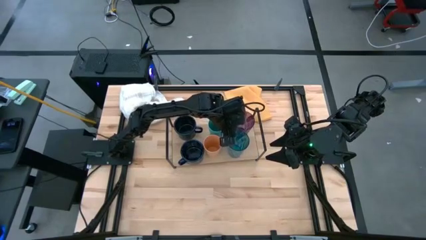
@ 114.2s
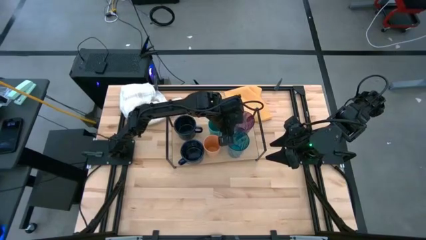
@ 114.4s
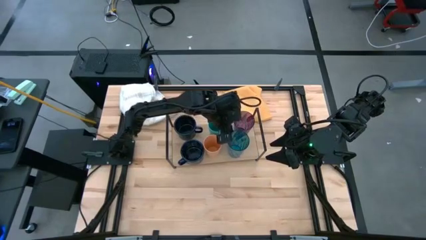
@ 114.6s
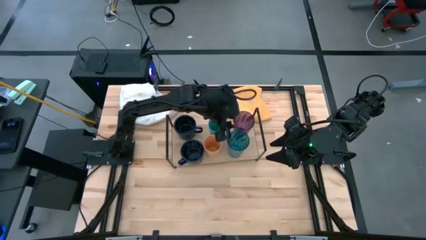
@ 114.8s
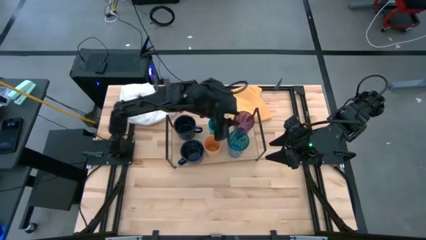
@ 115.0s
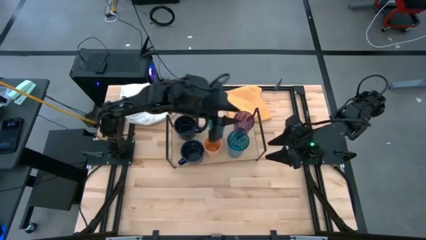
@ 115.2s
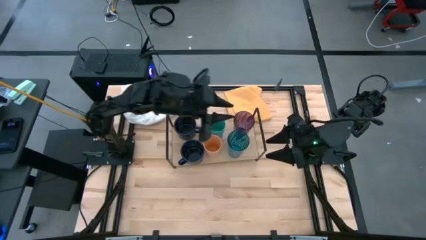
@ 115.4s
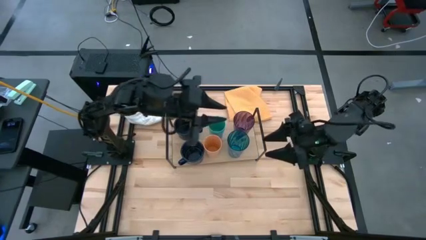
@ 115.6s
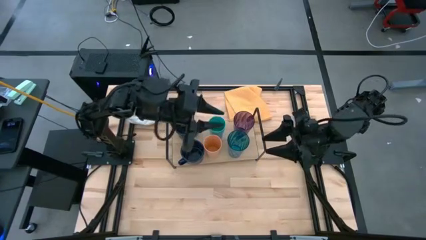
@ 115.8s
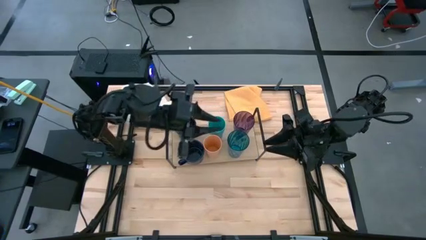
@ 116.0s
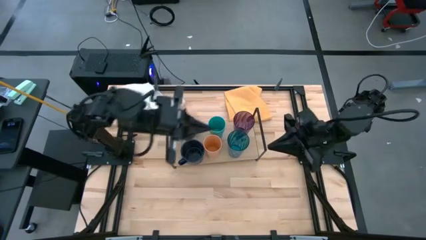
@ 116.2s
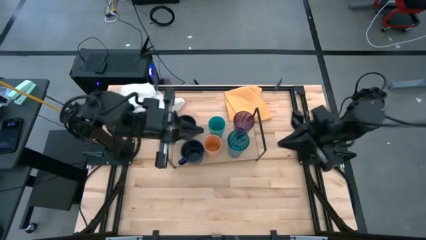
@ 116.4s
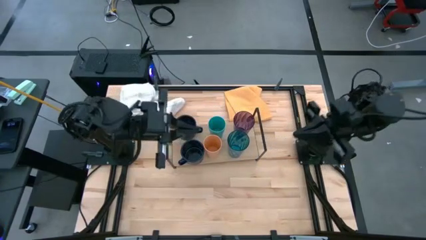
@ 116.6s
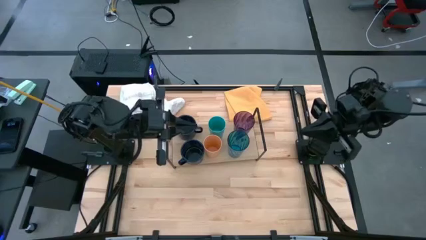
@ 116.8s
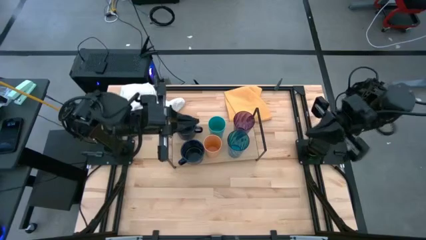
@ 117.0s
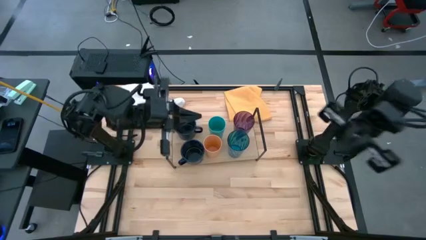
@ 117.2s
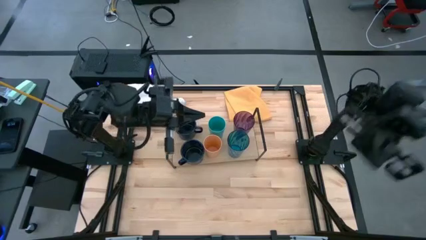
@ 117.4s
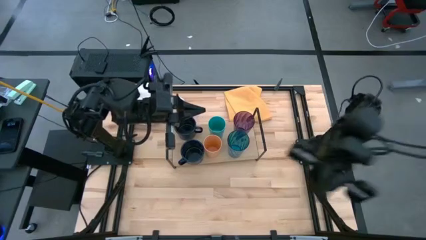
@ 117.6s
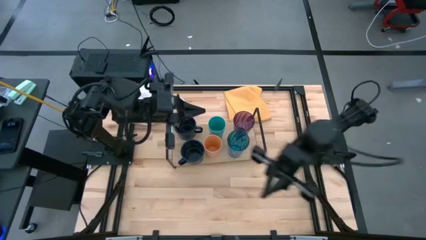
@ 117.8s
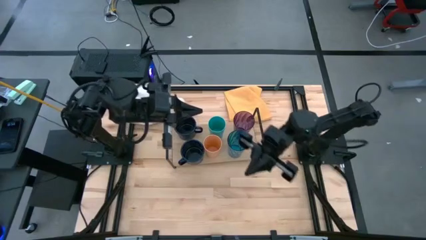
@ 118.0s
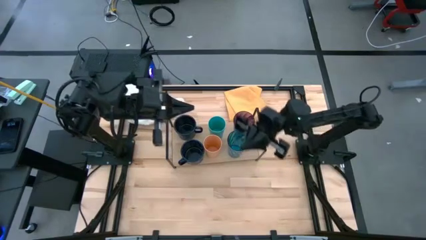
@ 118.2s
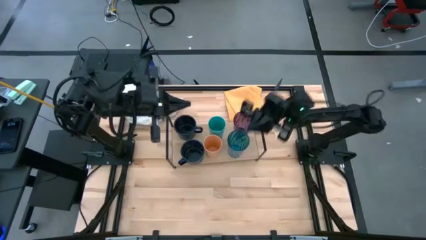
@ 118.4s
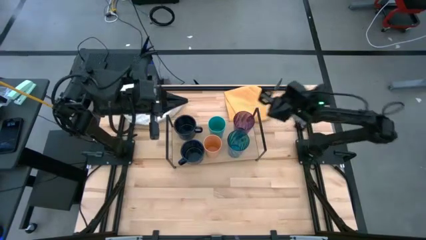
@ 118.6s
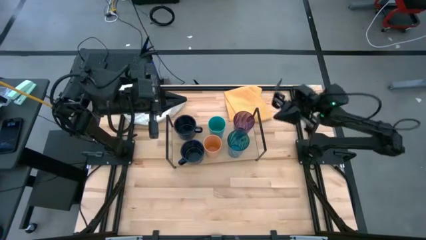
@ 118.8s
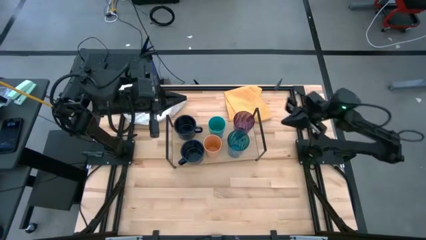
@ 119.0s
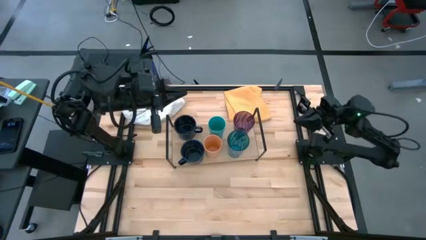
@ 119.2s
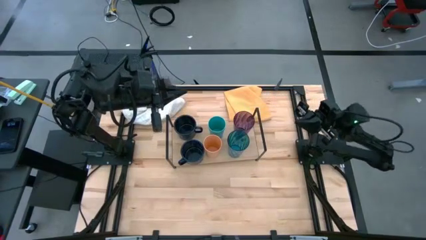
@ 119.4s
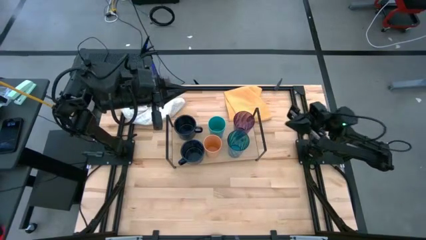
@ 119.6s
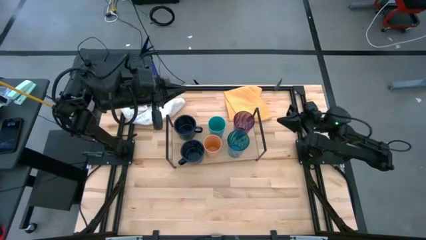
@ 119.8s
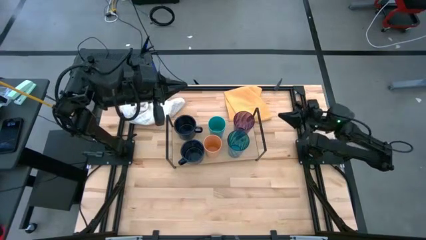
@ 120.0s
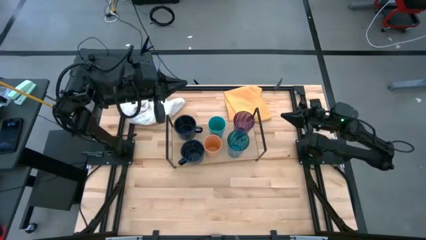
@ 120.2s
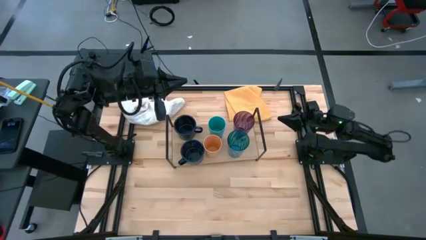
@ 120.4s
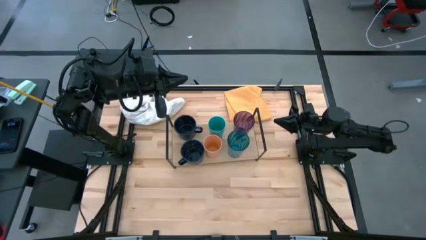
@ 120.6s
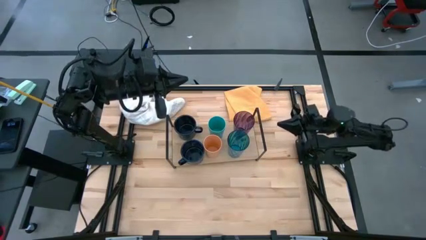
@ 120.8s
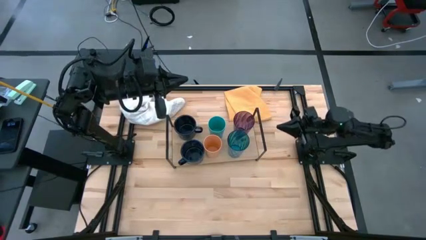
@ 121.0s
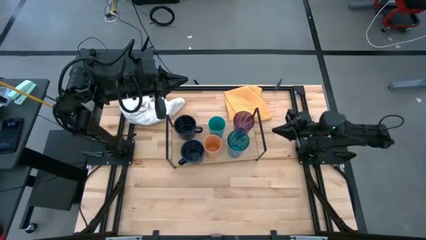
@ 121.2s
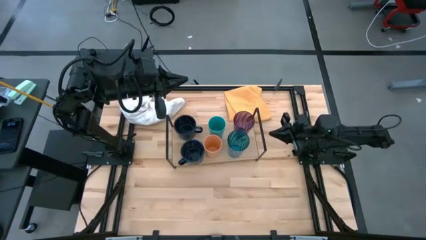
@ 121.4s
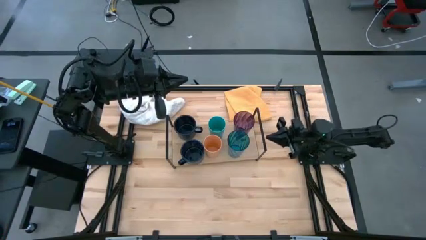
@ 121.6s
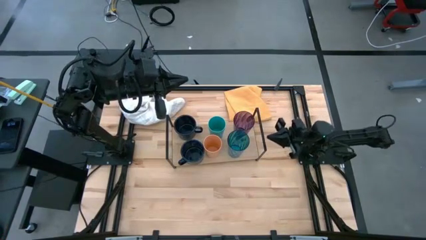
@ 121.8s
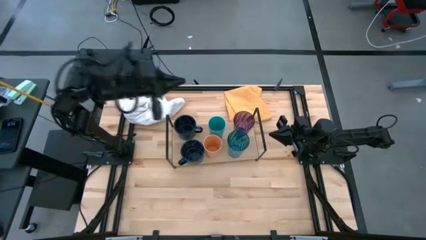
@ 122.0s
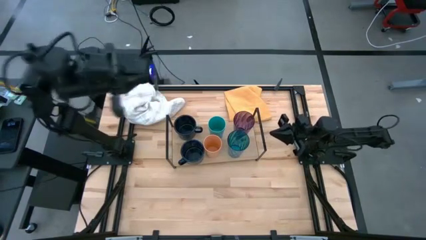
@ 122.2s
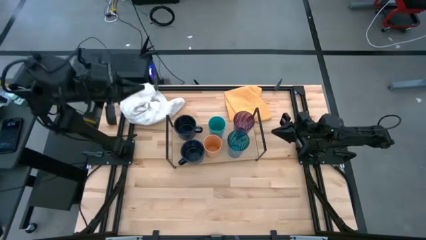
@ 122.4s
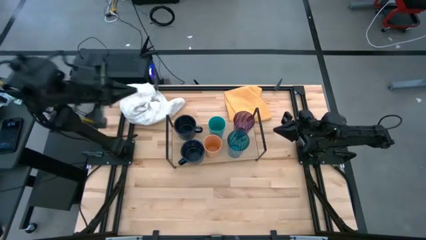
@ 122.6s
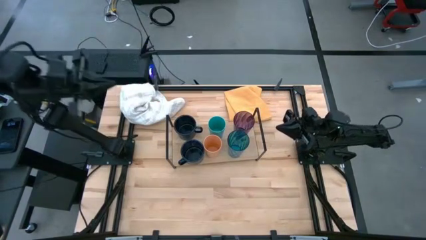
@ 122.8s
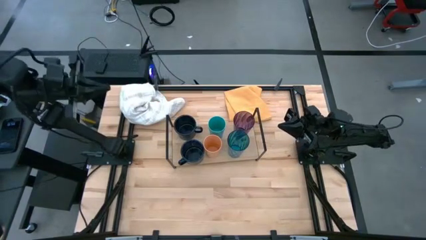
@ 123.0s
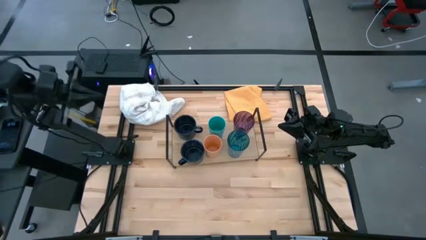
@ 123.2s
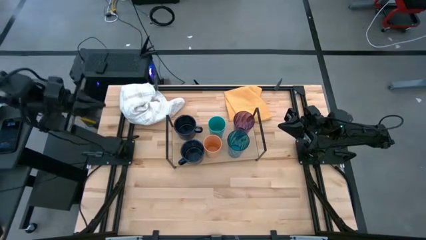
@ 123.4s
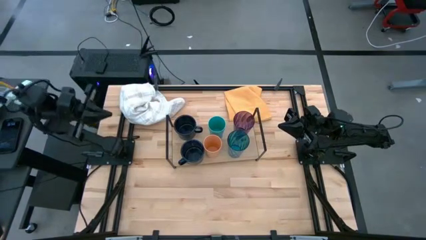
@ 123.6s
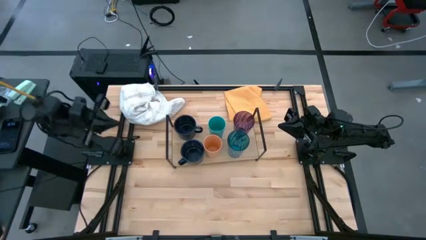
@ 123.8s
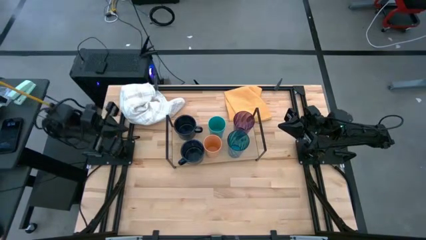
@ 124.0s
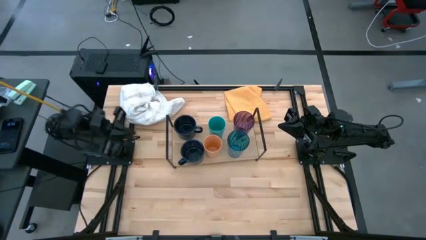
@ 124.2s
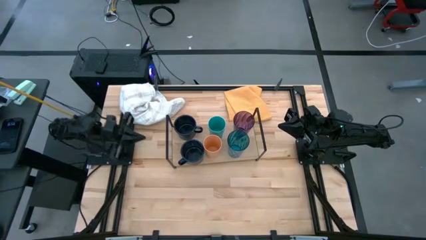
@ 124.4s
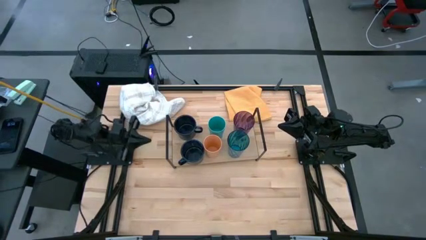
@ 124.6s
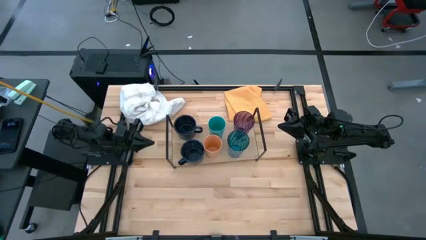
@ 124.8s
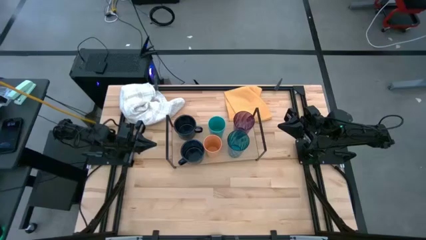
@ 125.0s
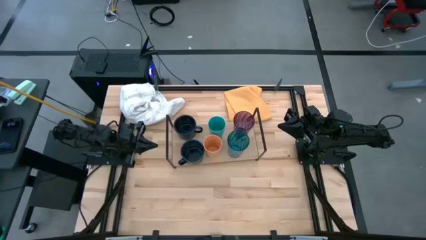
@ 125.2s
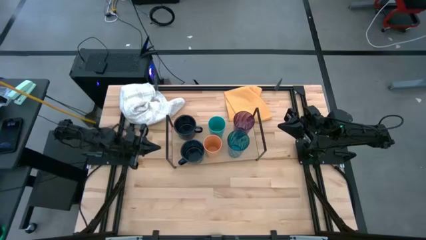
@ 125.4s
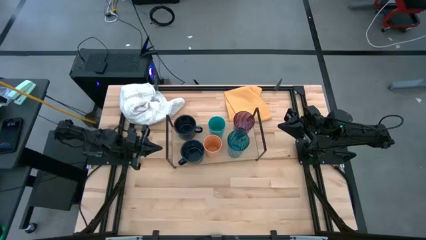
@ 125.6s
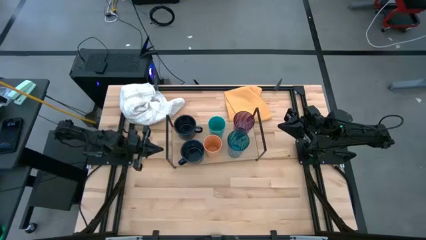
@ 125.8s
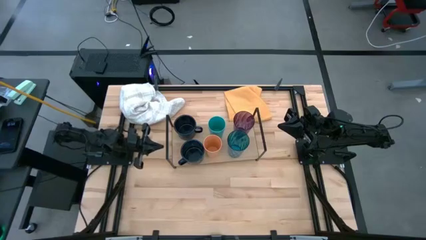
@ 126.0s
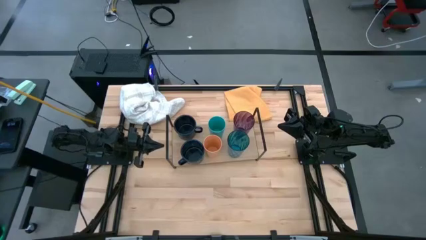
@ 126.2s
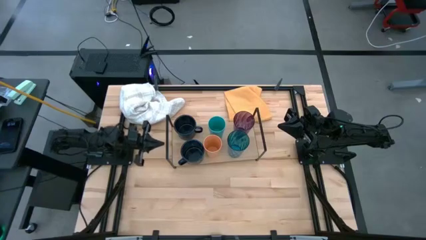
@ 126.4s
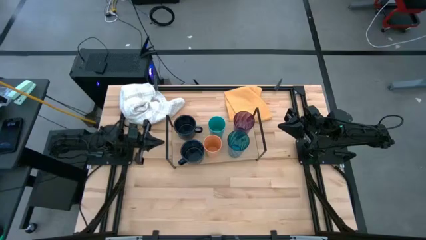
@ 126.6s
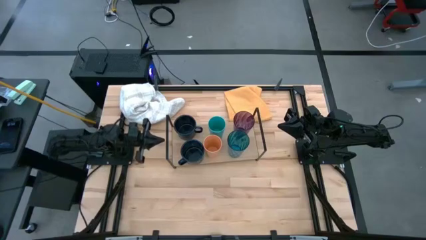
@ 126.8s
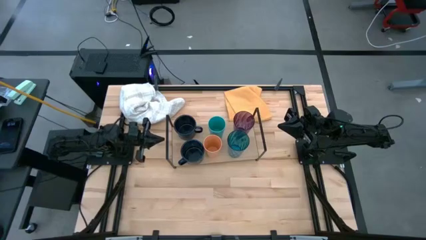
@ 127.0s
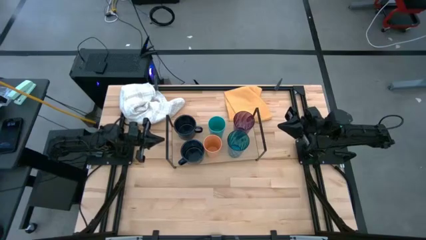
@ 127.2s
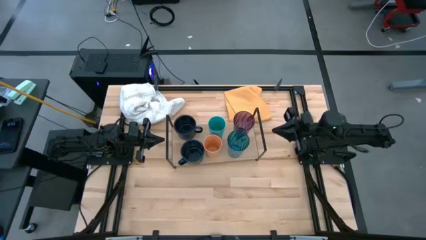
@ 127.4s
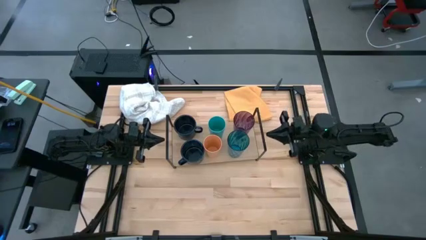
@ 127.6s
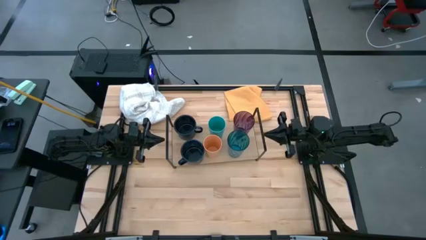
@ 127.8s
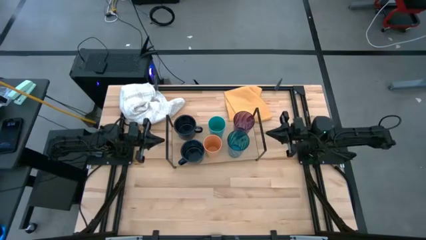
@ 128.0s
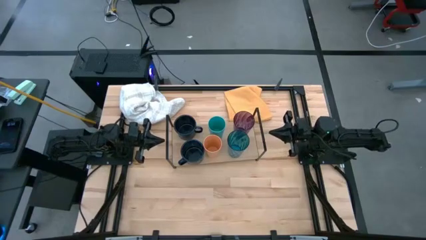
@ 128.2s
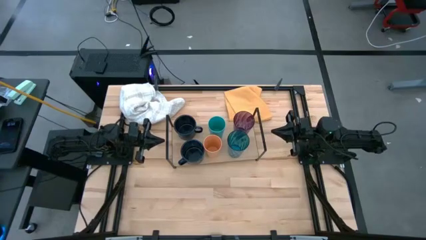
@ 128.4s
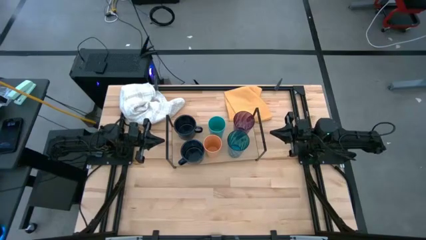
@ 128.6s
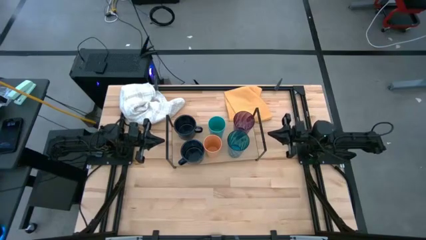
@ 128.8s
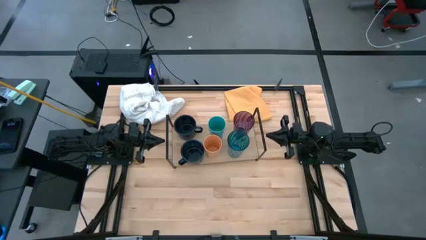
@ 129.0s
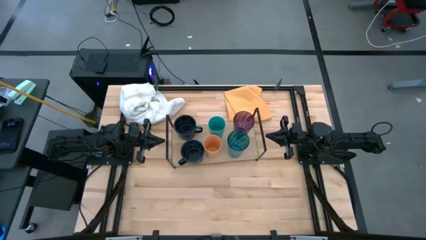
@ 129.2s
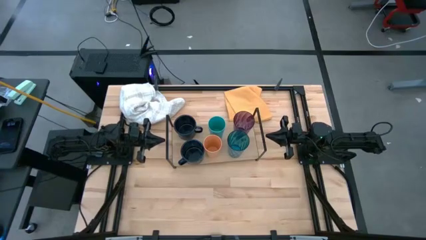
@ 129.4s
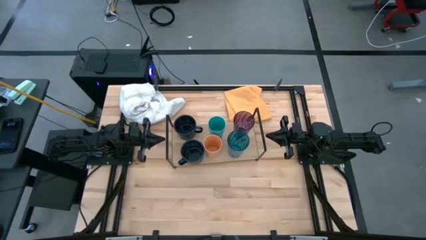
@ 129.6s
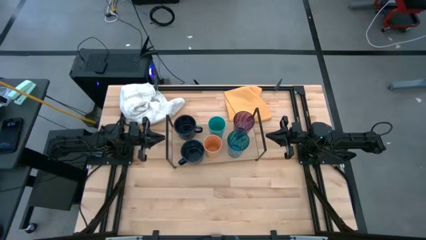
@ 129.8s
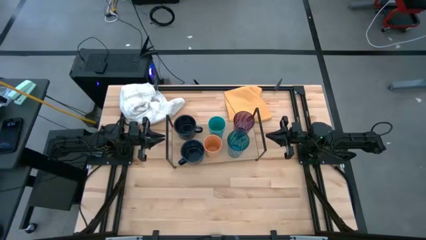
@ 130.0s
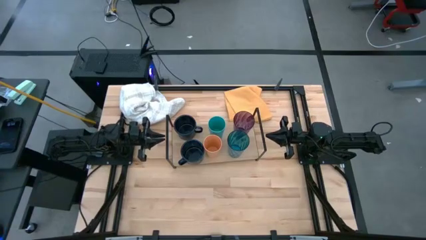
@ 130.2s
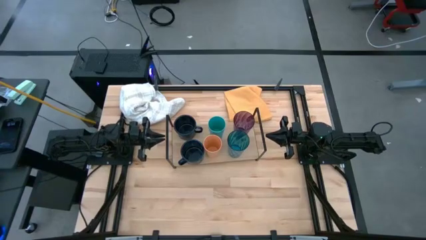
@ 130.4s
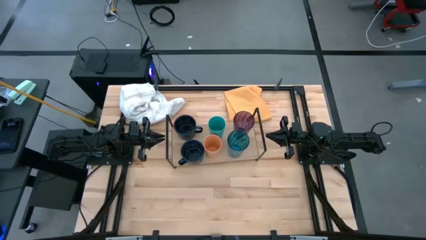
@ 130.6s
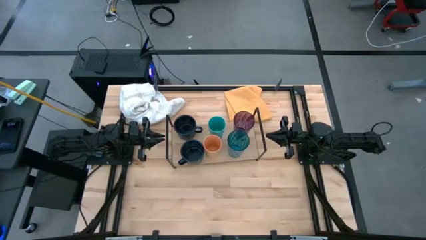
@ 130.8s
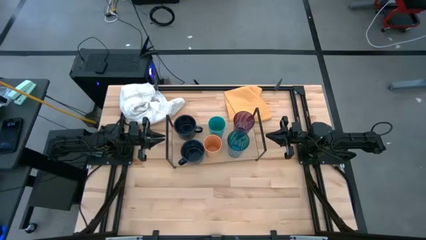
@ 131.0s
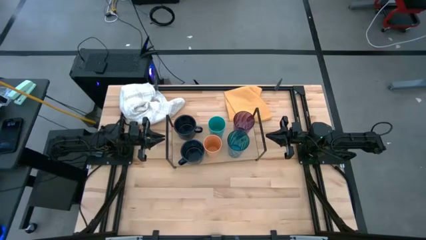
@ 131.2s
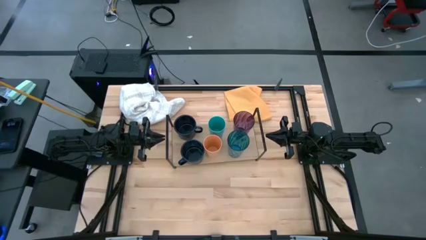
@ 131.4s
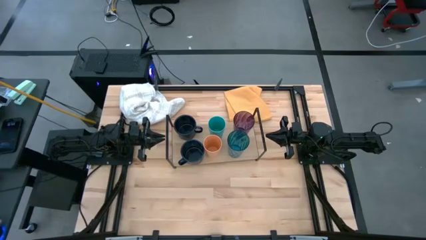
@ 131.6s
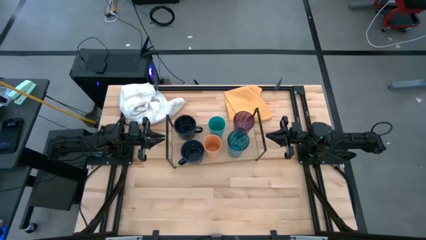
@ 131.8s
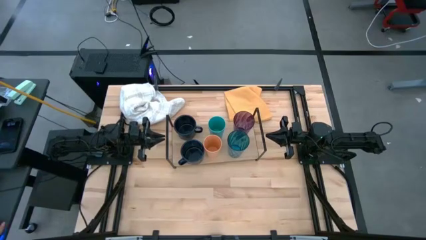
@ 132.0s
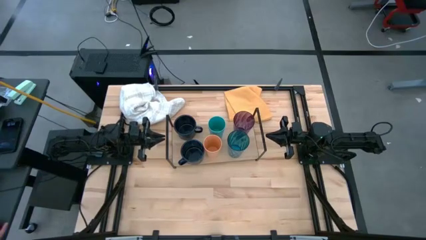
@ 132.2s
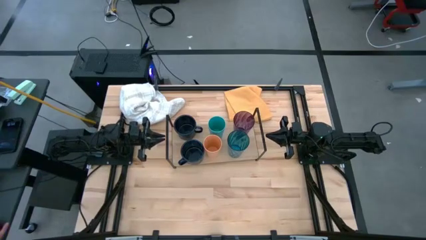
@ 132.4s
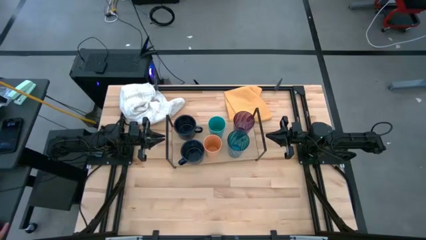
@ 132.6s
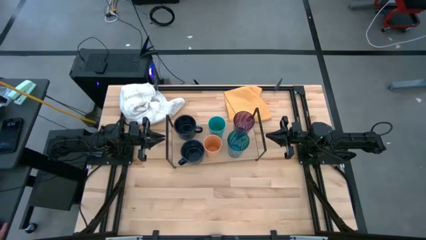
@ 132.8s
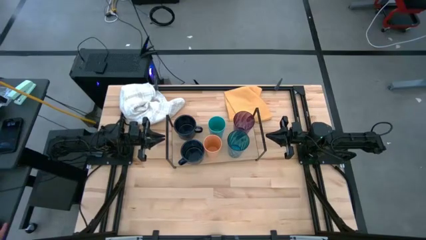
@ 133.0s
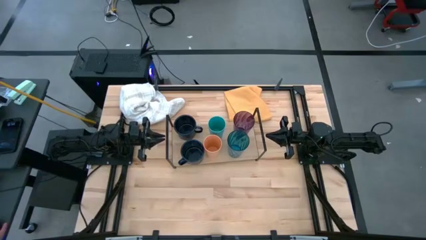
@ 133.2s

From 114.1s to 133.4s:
Task: Stack small to large cups/mugs on shelf
Return to Home Position
